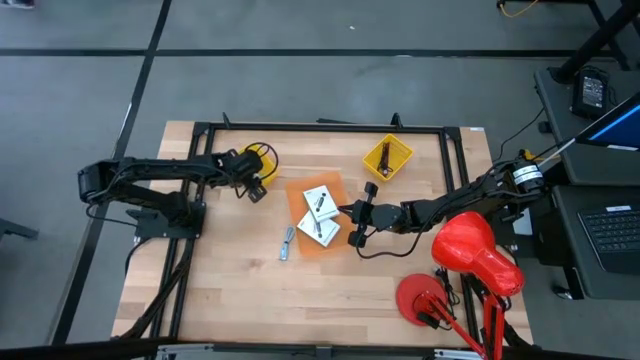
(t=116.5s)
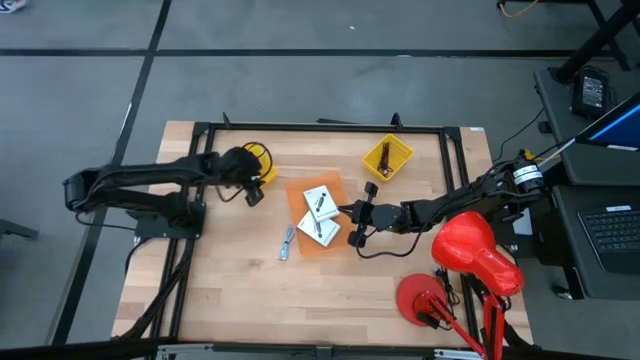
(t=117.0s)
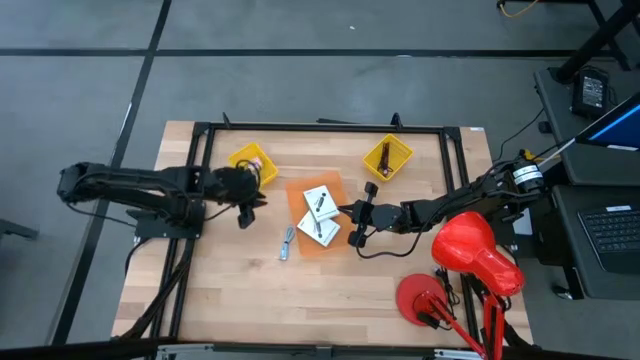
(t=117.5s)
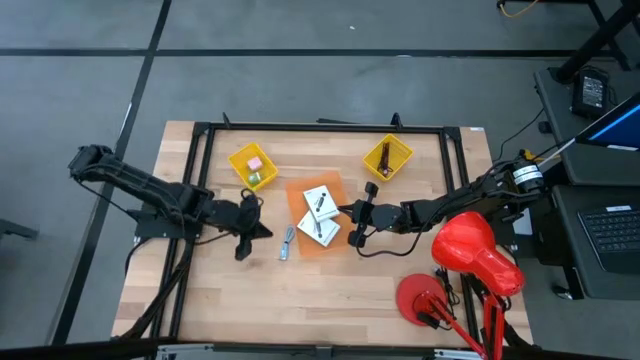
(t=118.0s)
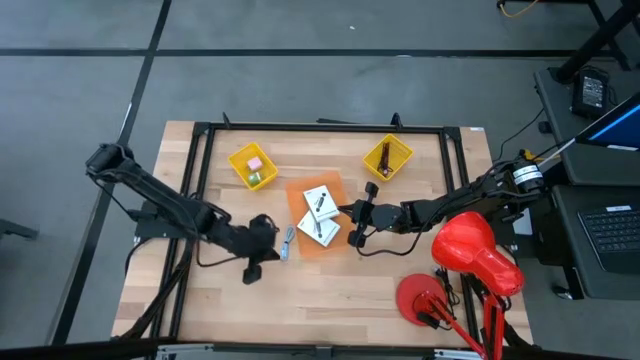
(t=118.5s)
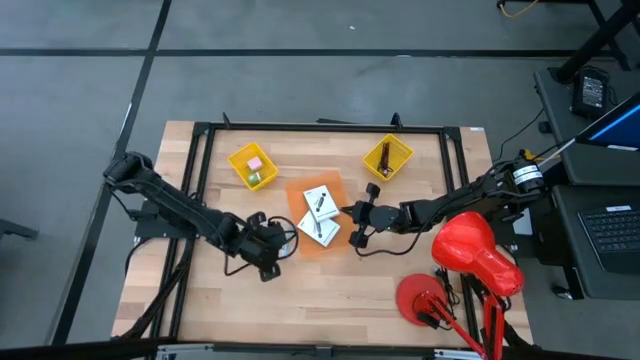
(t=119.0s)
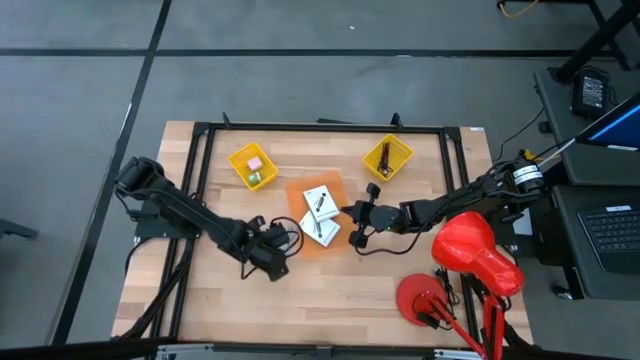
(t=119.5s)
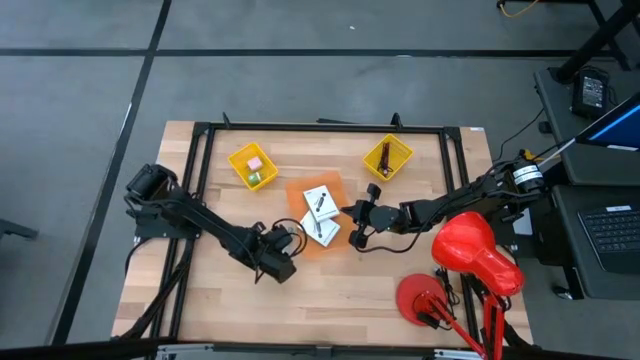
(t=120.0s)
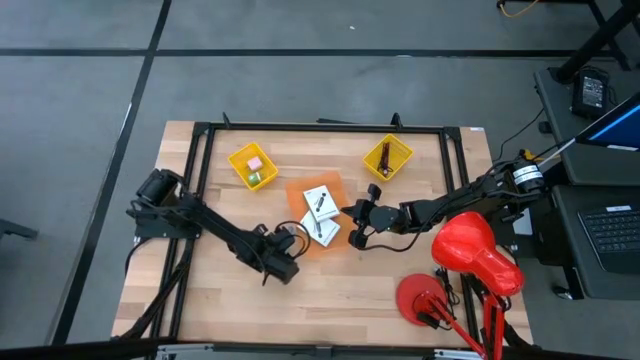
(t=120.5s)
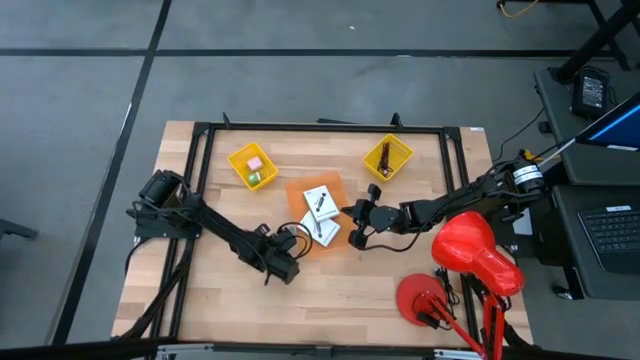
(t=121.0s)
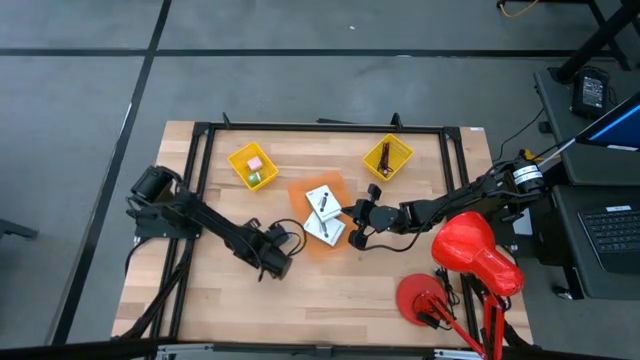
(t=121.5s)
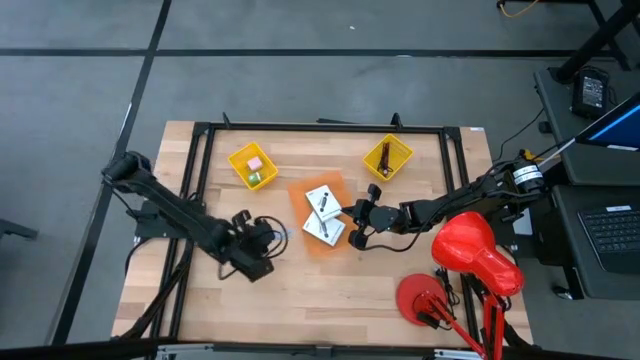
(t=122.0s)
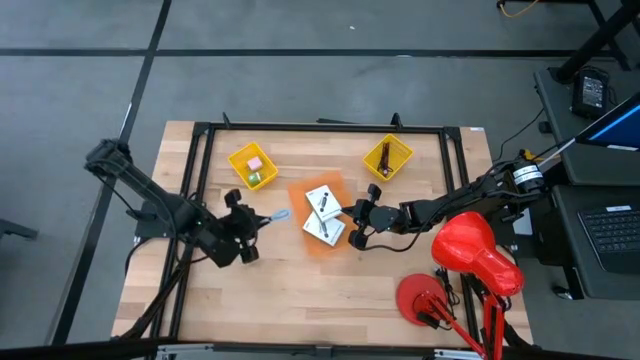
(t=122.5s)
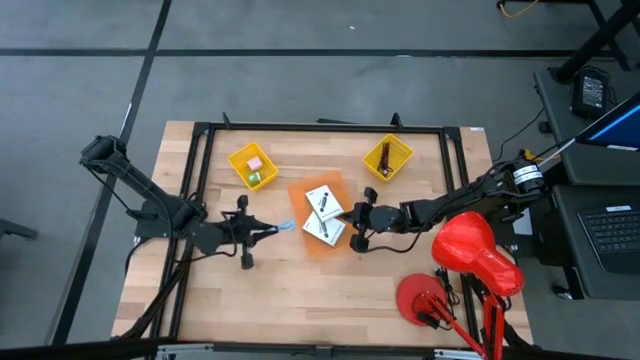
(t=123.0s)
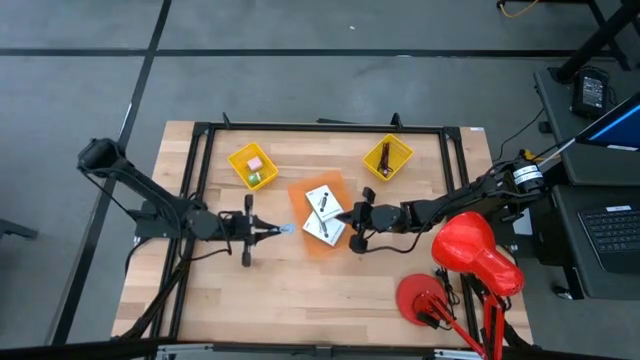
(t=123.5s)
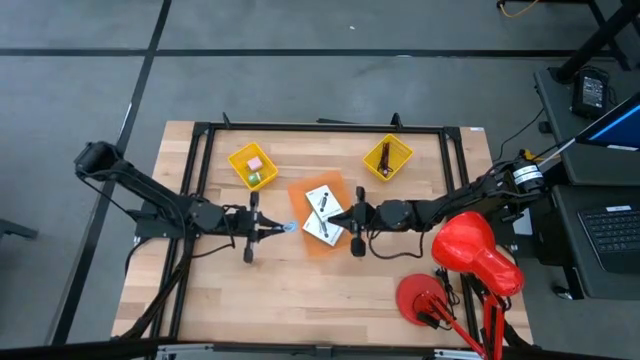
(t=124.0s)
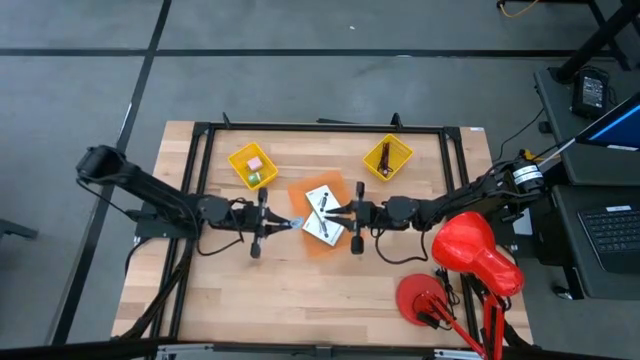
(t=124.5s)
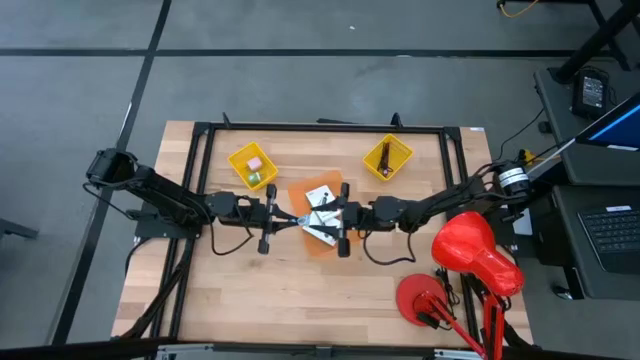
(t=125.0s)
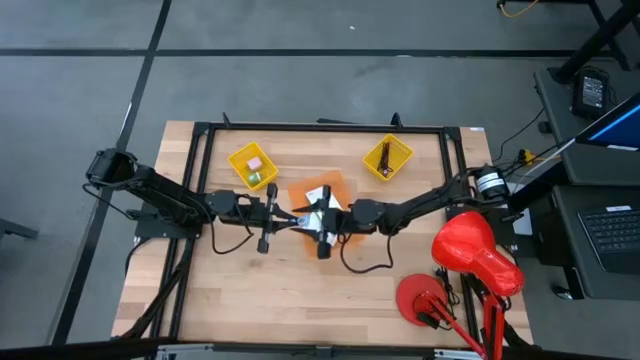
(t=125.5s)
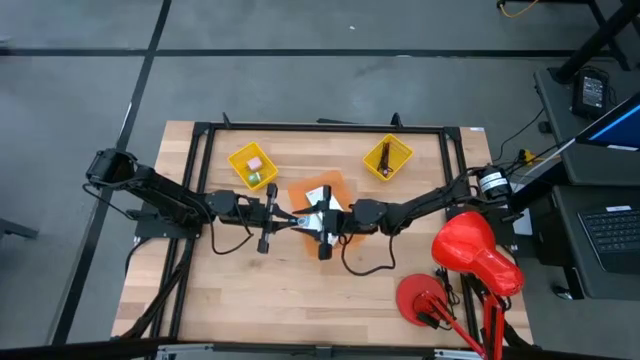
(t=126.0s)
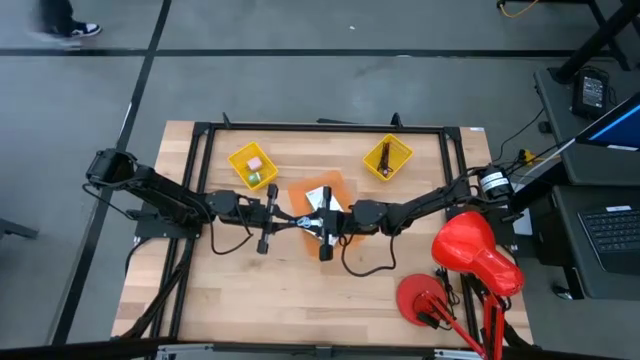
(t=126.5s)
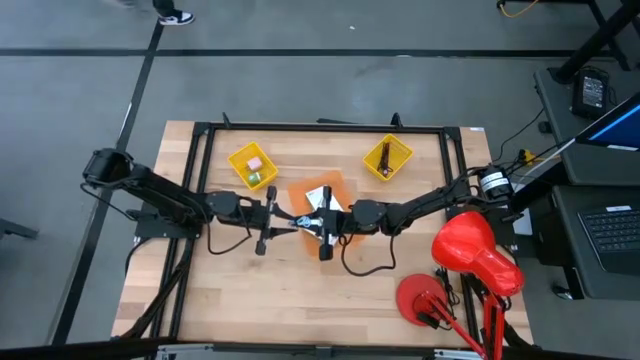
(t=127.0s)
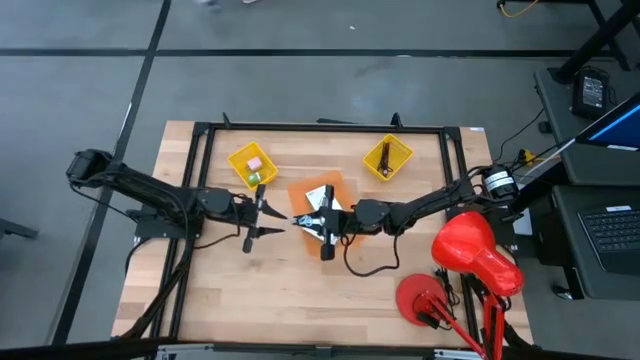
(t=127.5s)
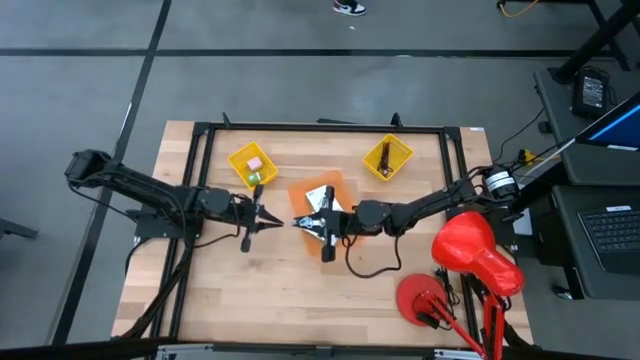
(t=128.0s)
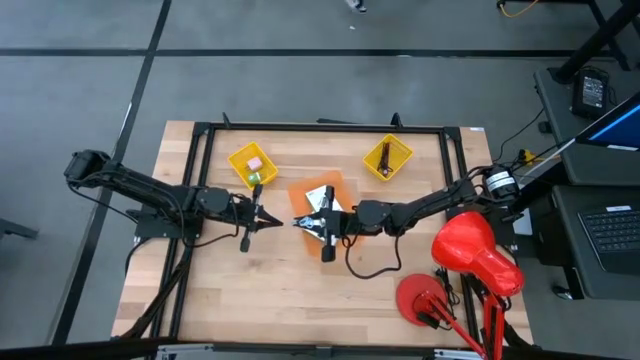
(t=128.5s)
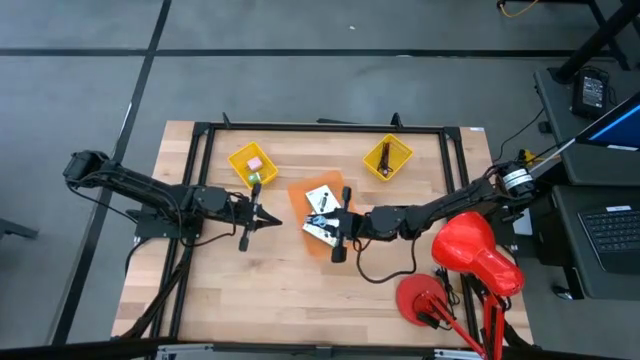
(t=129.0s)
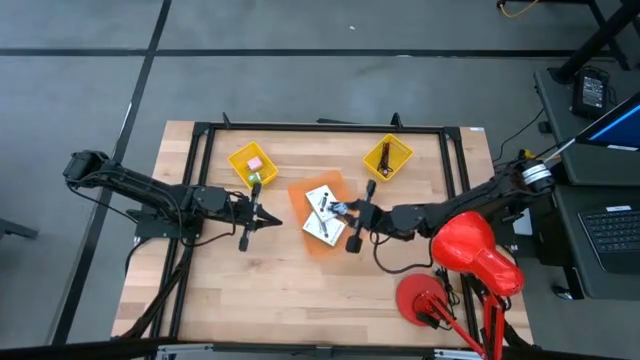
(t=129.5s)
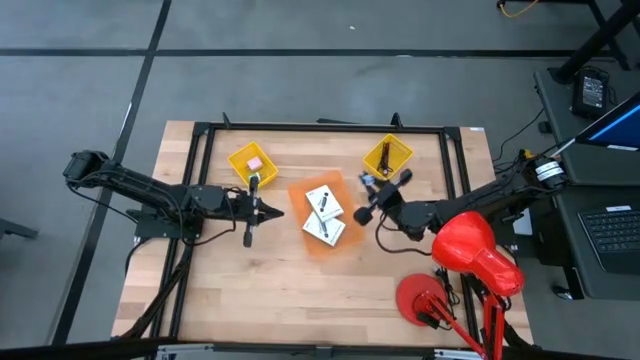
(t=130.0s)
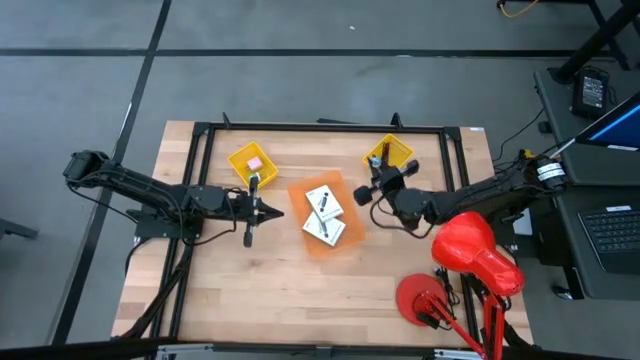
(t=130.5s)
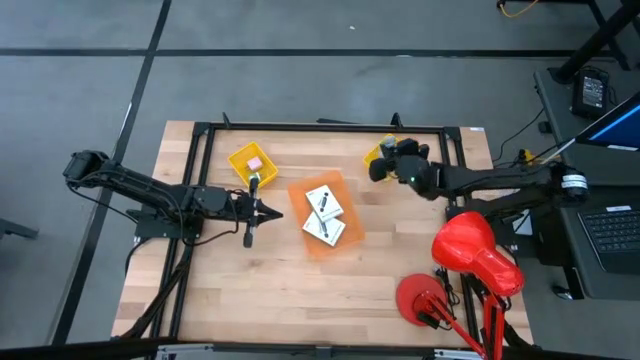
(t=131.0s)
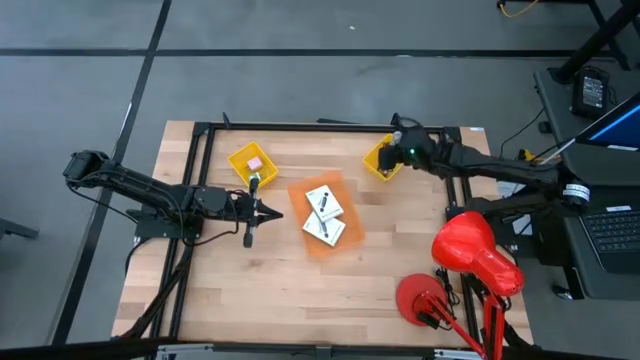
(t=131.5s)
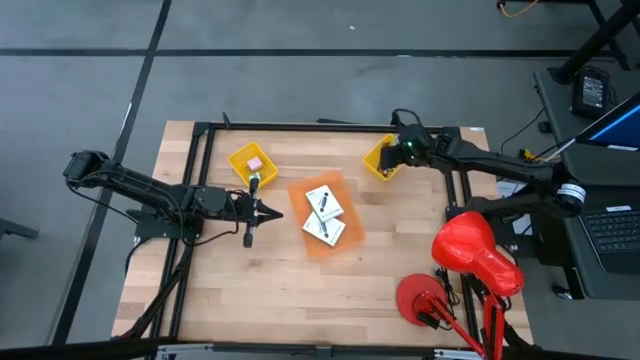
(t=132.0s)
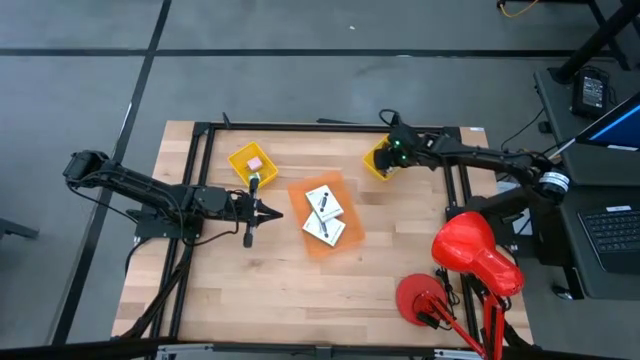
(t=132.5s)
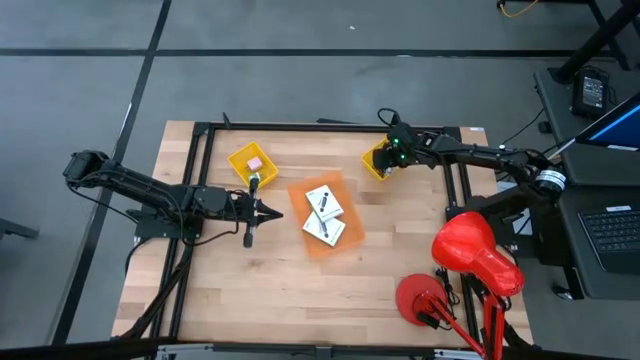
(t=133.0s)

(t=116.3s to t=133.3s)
Task: Pick and place items into bin
Put the blue charger cable into the right yellow bin

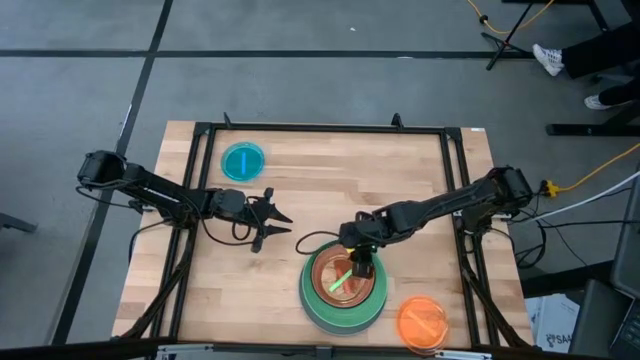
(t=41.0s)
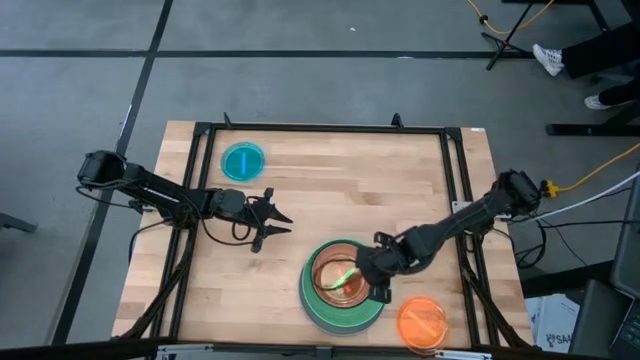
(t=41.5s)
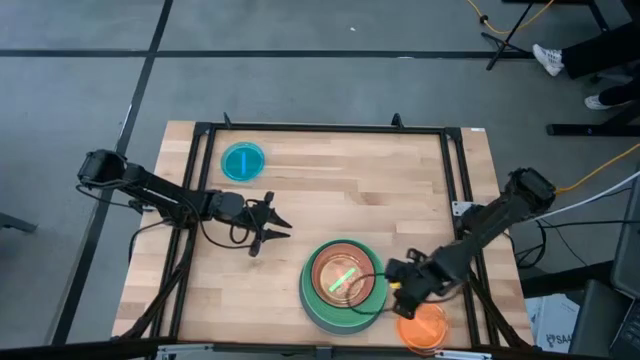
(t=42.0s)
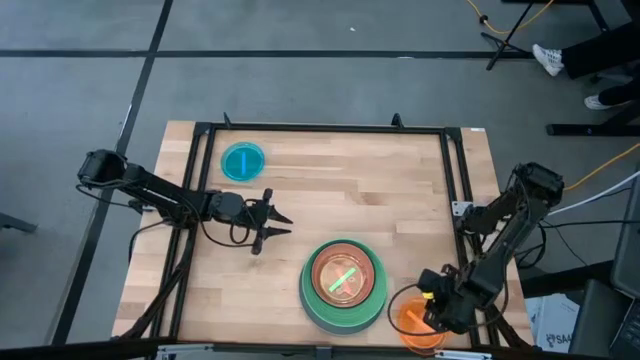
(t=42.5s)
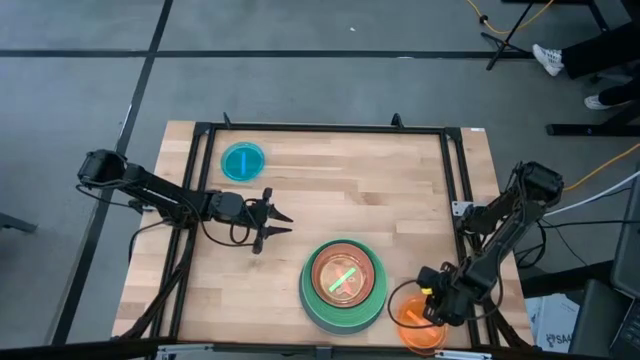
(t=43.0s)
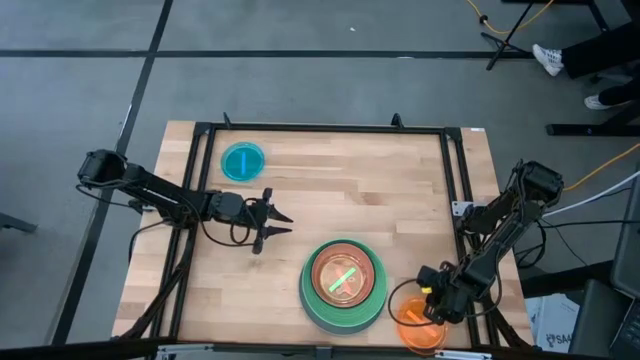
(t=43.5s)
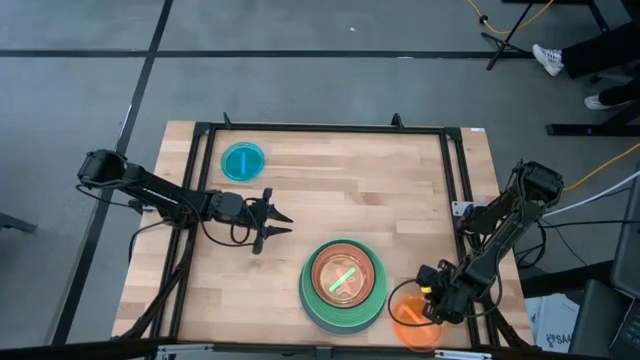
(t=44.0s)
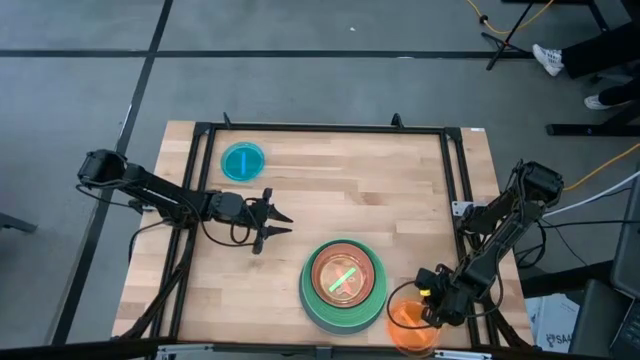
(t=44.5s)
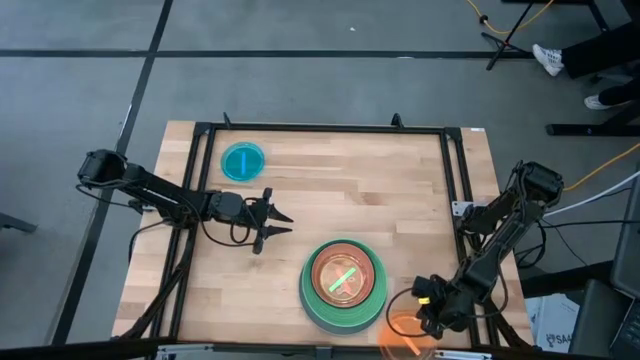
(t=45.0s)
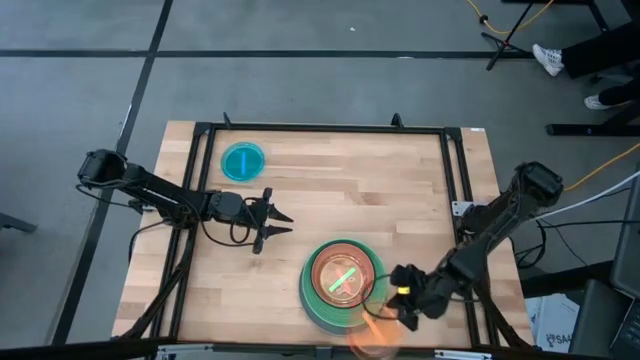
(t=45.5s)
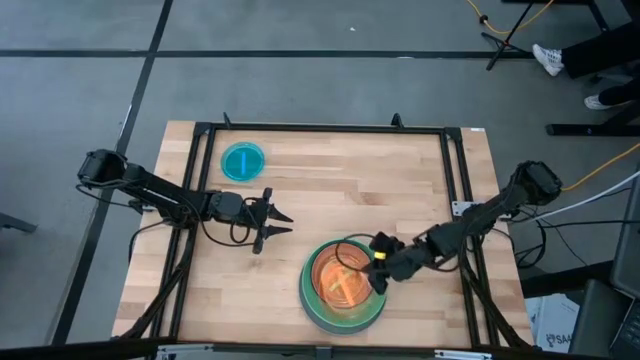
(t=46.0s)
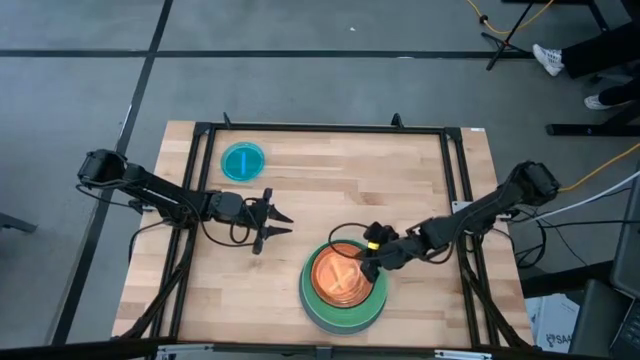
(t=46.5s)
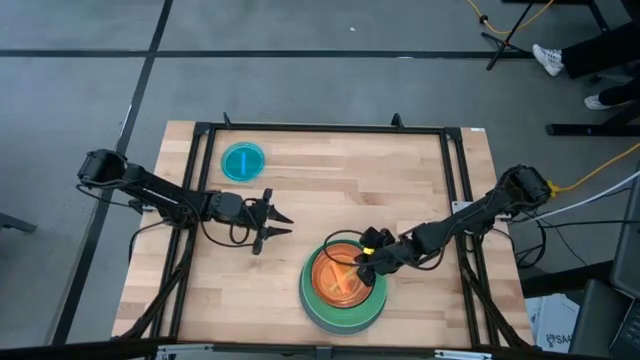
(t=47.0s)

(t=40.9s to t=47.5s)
Task: Stack plastic plates
Stack the orange plate on top of the green plate
